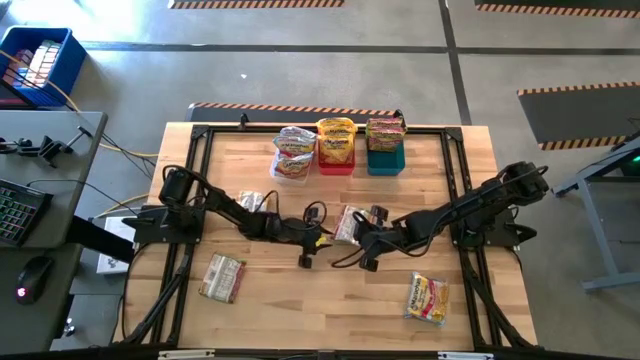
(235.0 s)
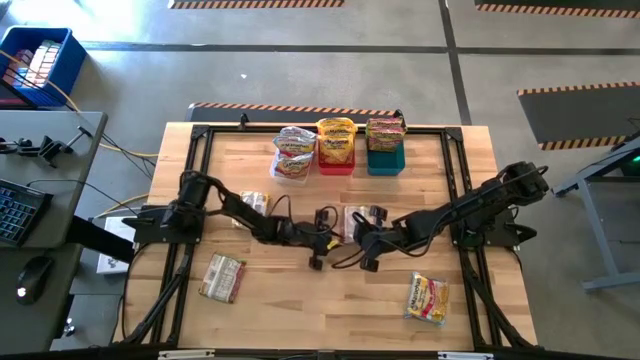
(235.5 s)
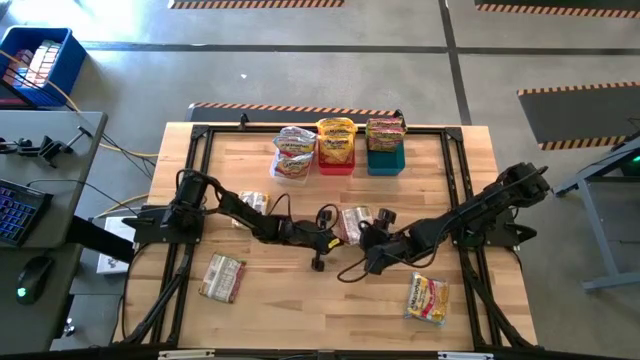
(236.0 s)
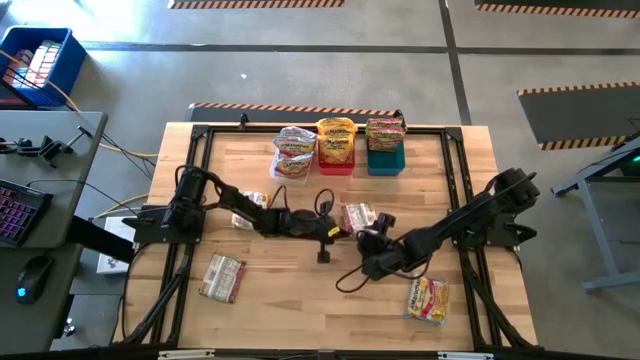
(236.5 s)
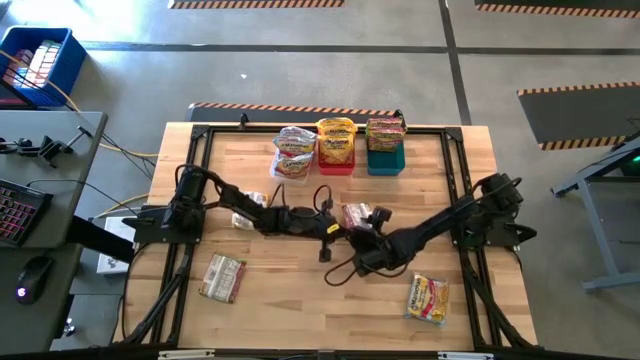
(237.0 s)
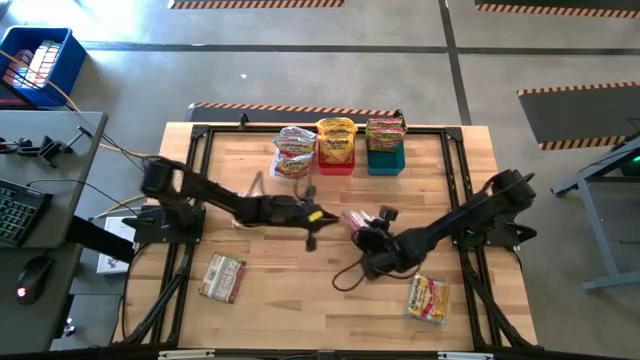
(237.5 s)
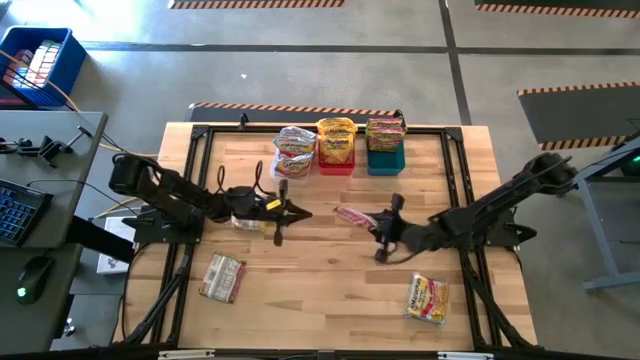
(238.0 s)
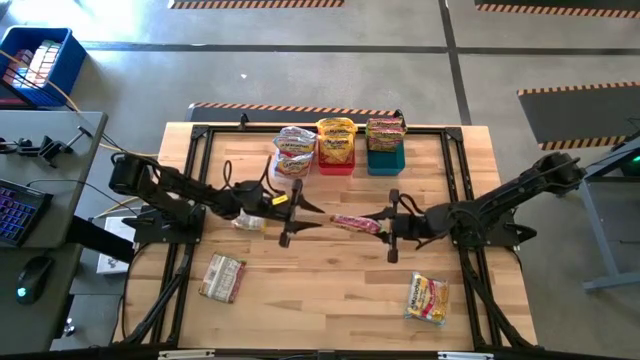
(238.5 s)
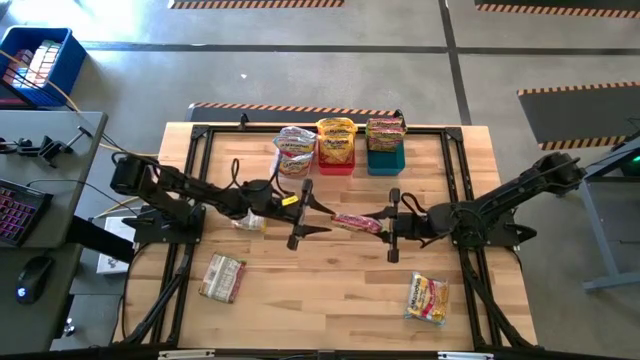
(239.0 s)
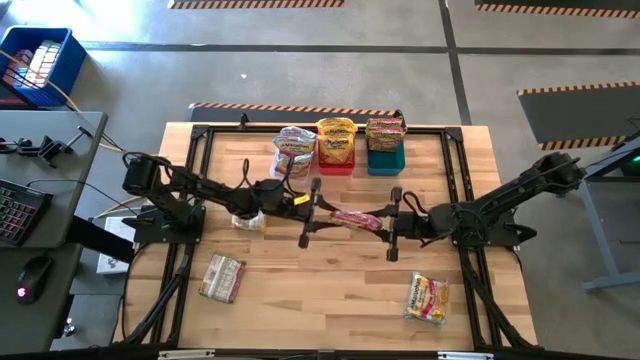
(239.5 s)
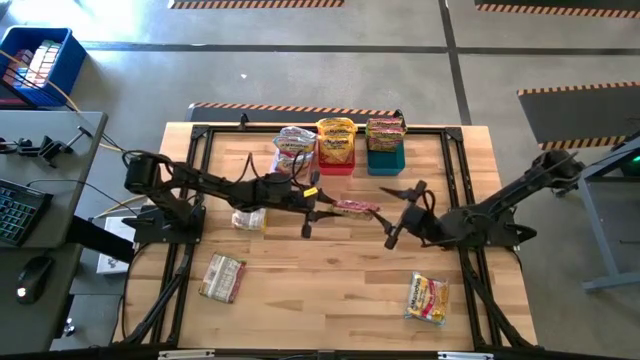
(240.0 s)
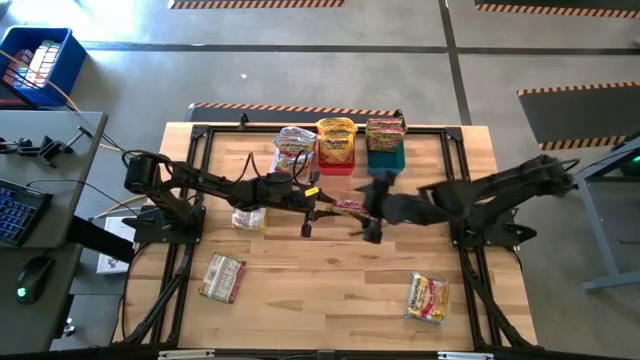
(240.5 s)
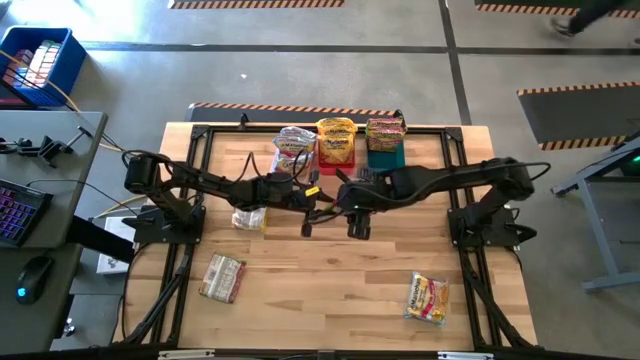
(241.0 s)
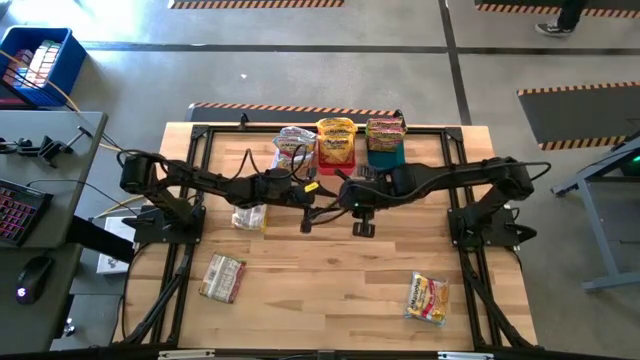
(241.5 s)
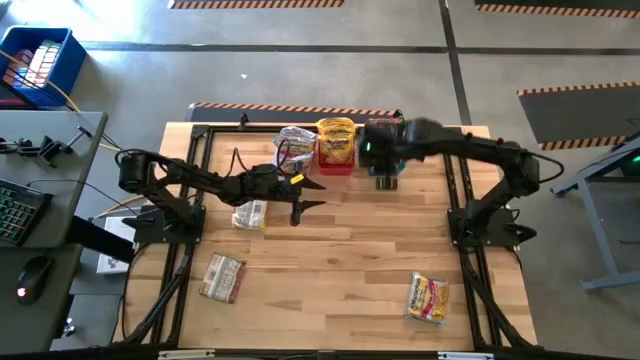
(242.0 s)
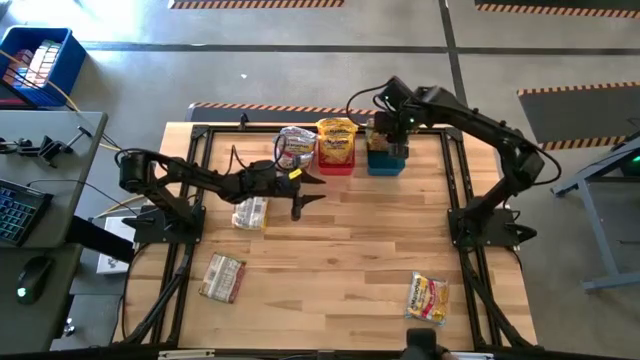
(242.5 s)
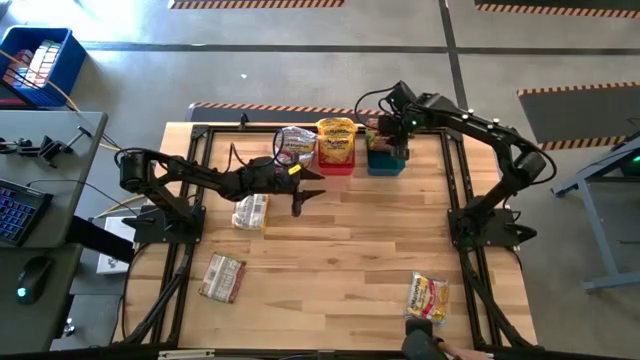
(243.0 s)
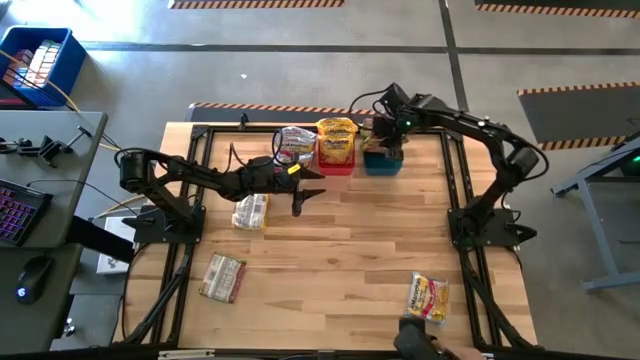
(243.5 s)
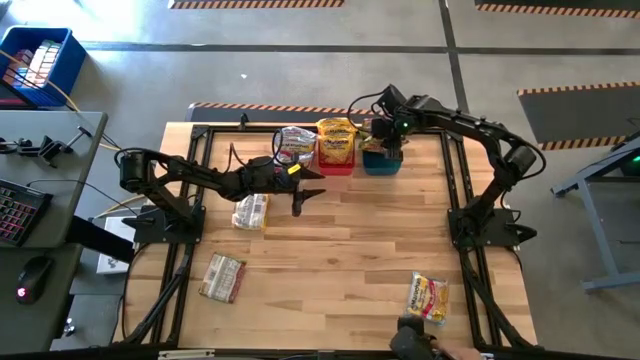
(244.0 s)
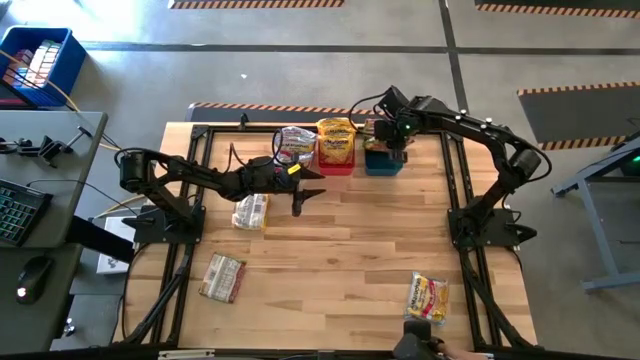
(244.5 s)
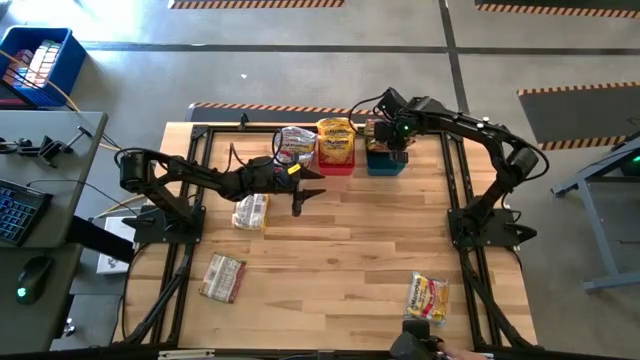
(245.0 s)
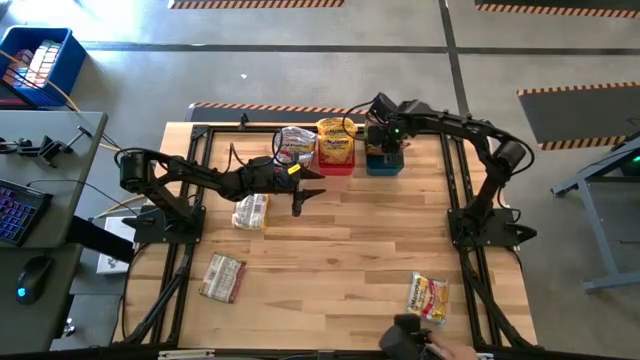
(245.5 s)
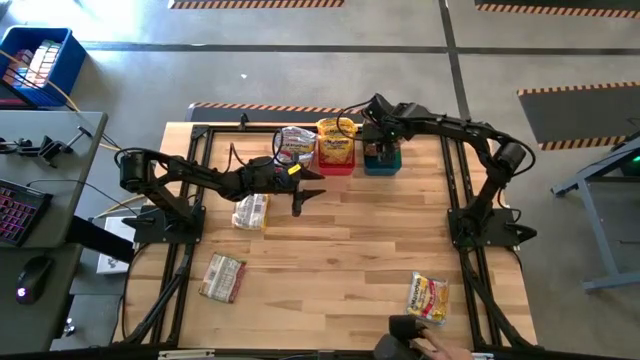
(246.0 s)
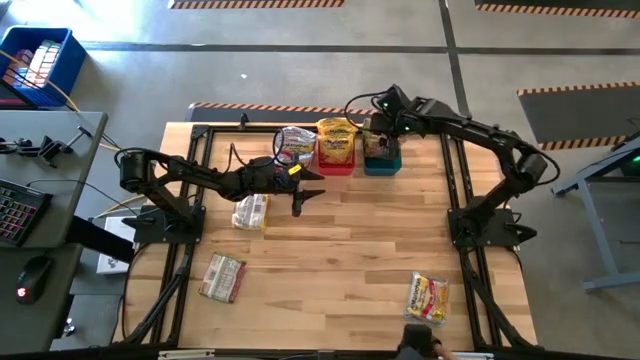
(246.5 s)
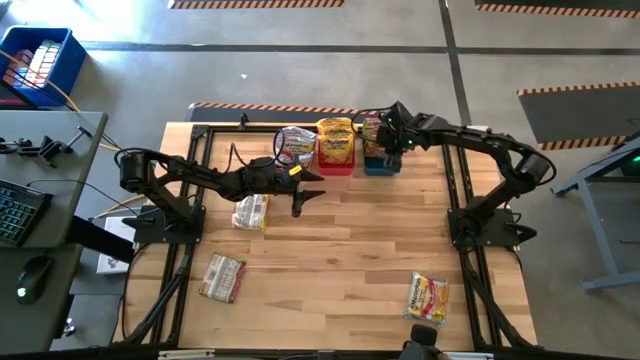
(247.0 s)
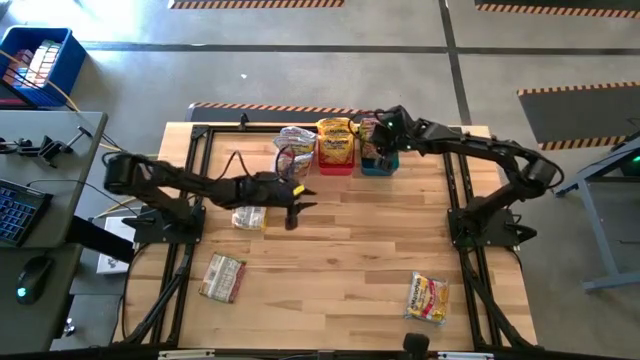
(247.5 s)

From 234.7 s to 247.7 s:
Task: Sort Maruchan noodles
Put the green noodle pack into the blue bin

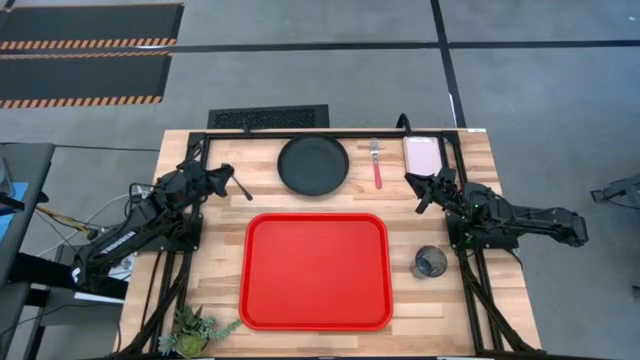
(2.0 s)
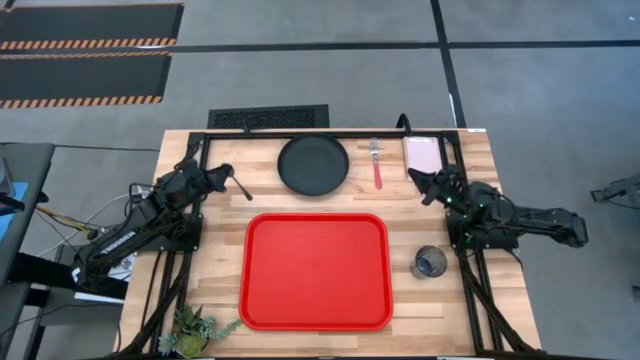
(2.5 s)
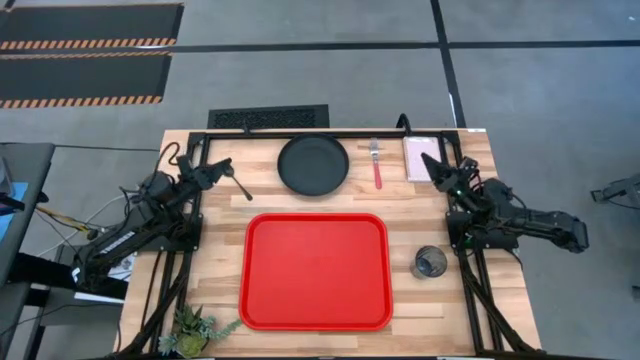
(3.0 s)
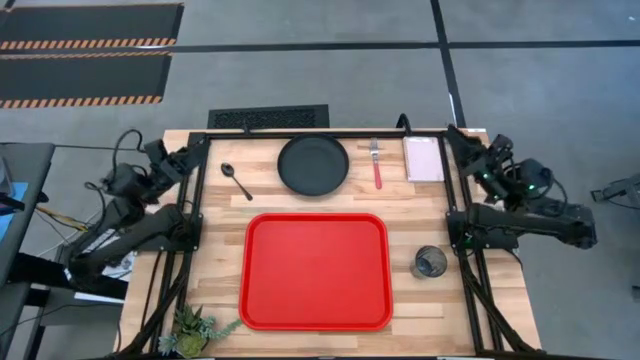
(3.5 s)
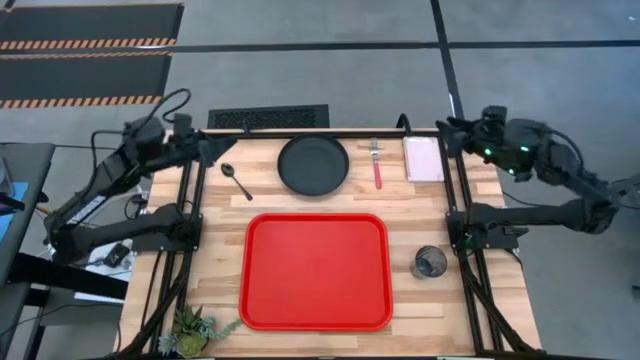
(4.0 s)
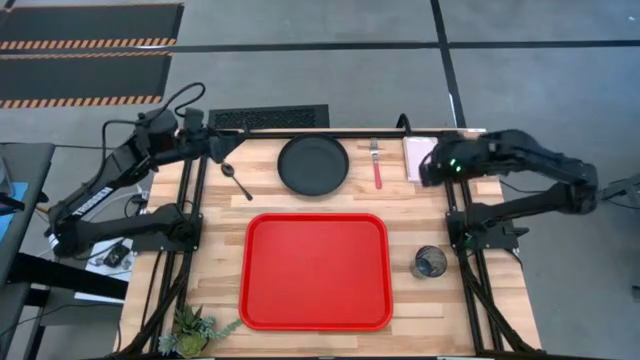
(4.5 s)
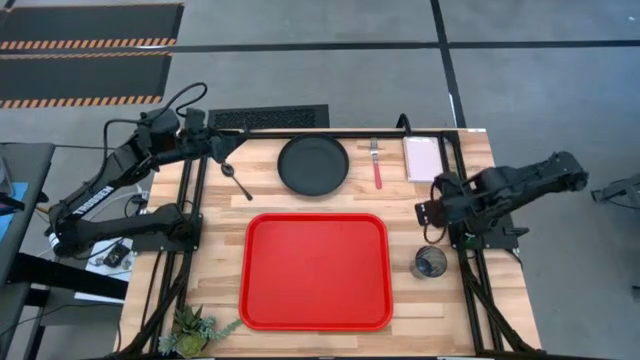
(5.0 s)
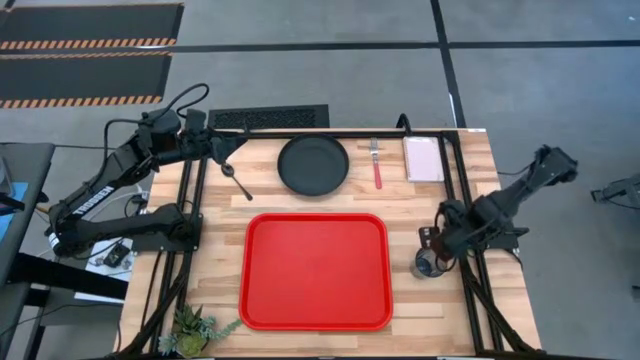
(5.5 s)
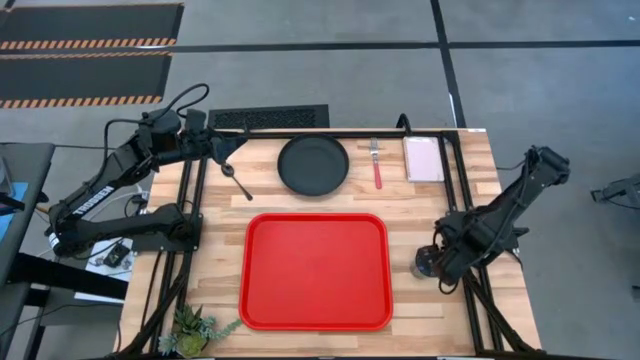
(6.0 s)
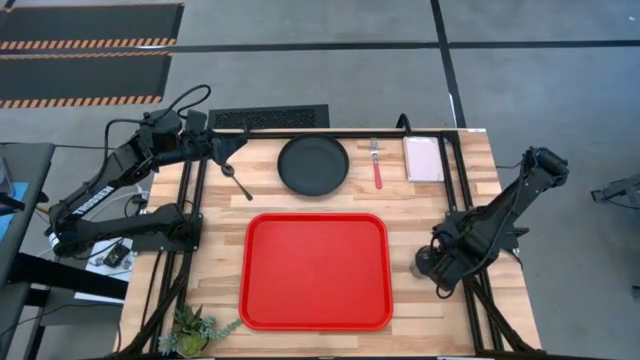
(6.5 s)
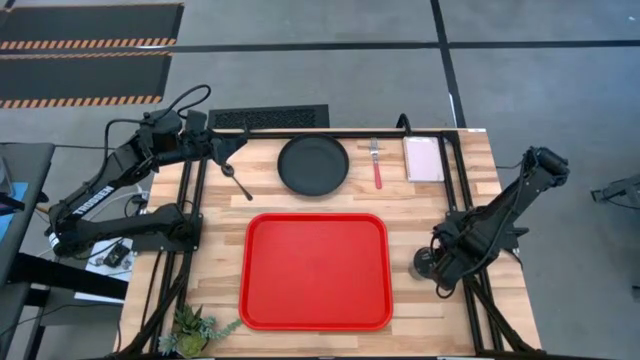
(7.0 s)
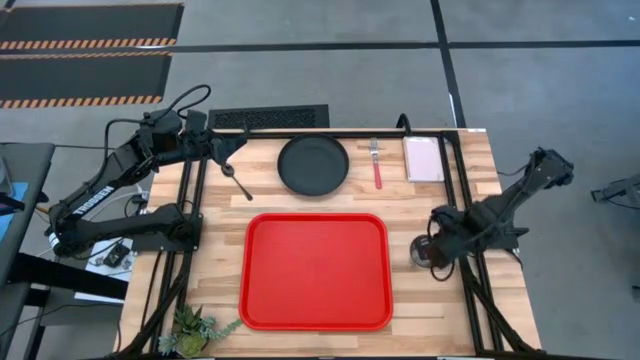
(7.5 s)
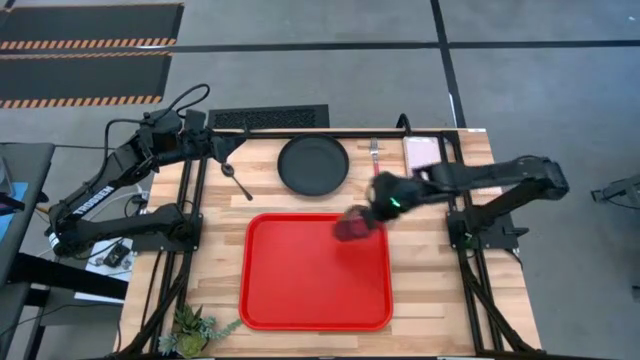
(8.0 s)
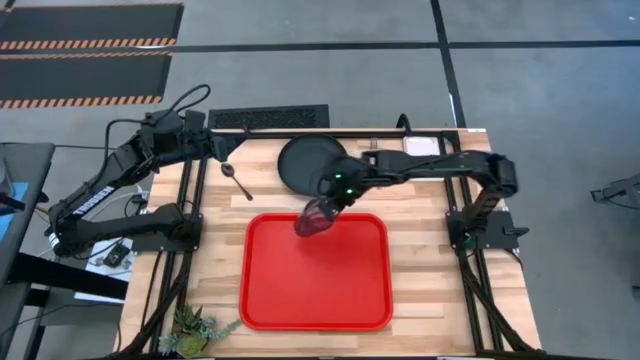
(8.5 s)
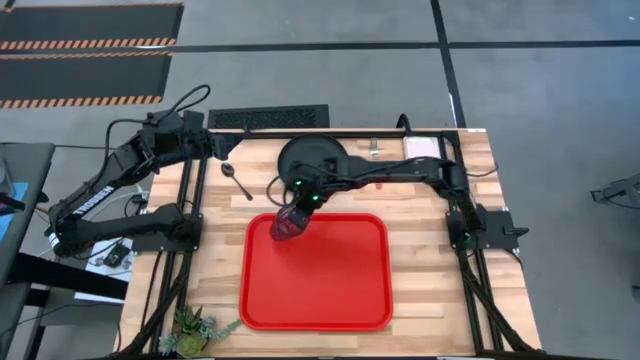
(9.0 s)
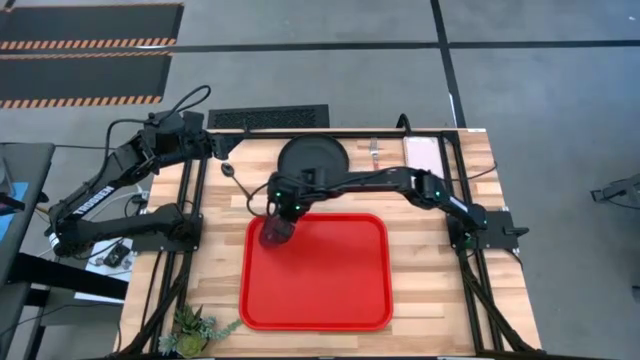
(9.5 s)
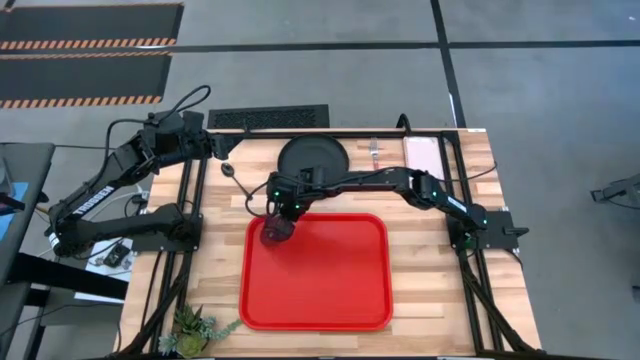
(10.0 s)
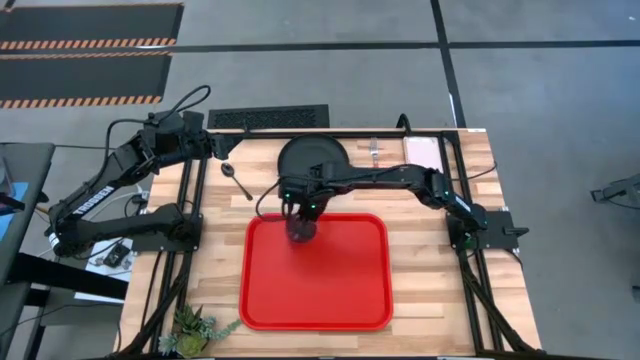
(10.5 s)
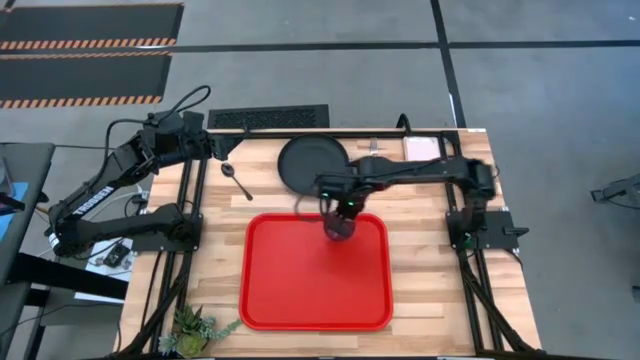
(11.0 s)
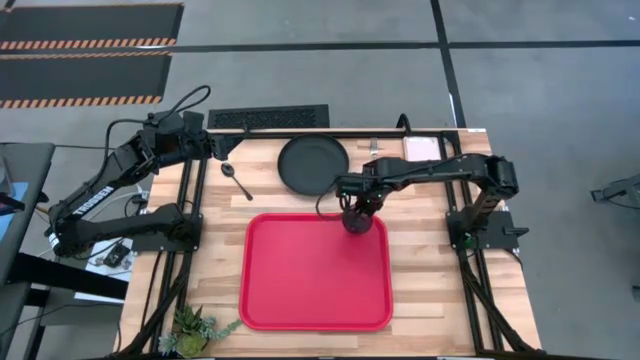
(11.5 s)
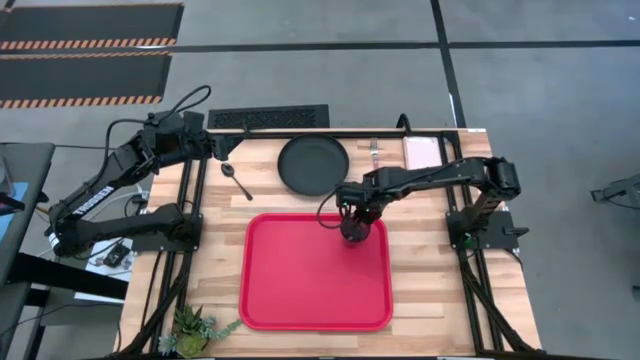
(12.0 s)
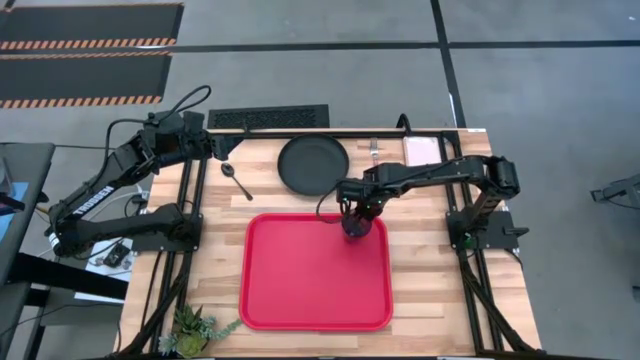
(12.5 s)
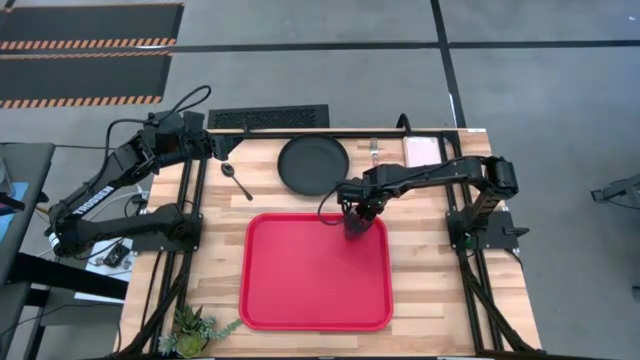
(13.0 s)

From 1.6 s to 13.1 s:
Task: Pick and place plate/cup/fork/spoon on tray
Put the blue cup on the upper right of the red serving tray
